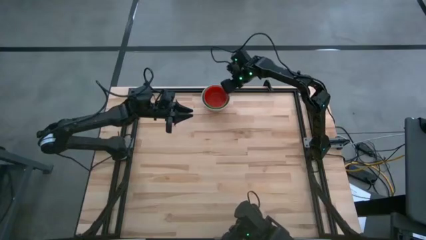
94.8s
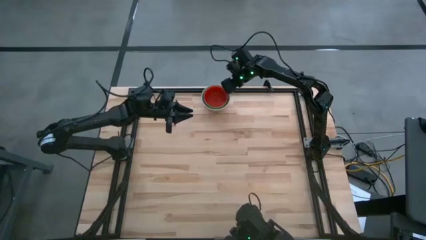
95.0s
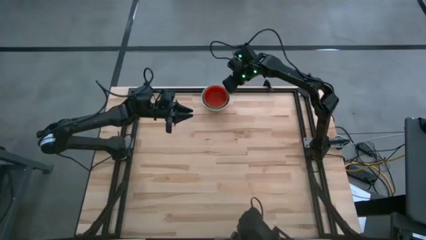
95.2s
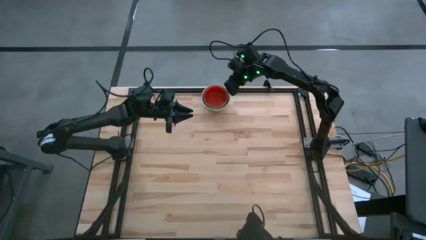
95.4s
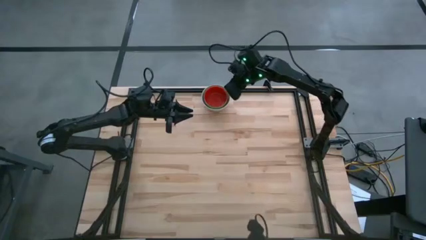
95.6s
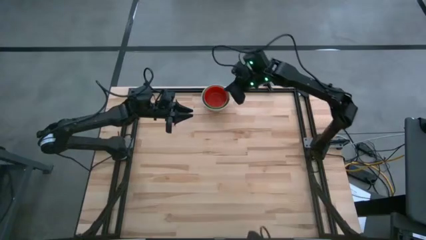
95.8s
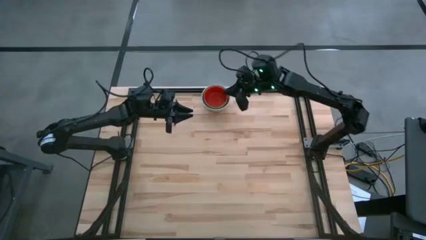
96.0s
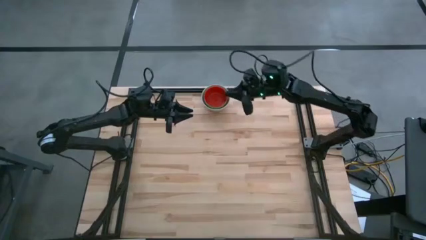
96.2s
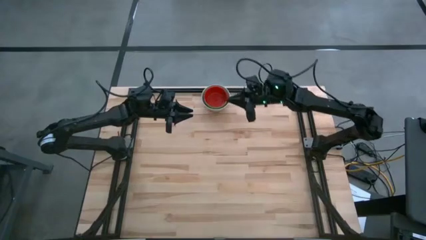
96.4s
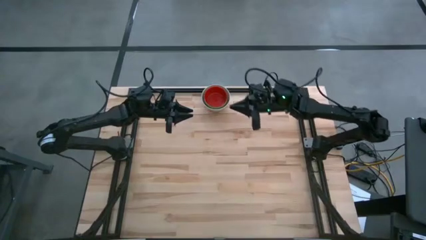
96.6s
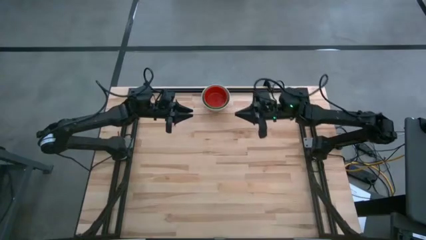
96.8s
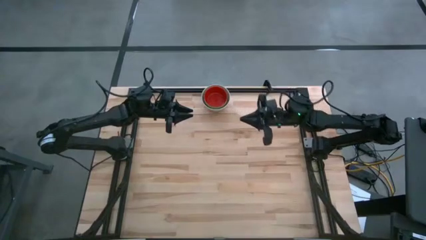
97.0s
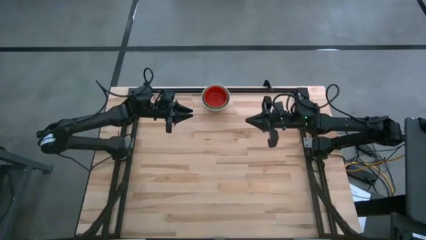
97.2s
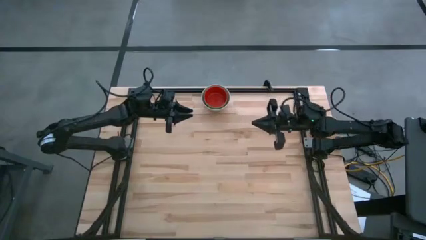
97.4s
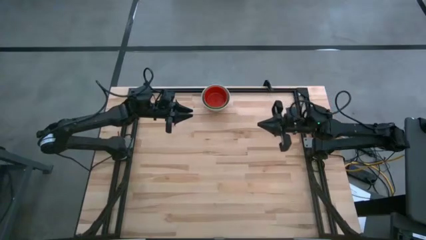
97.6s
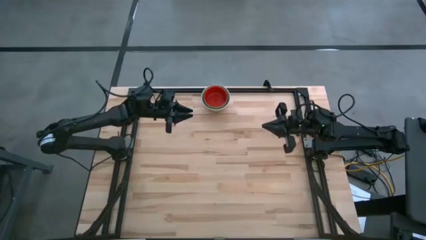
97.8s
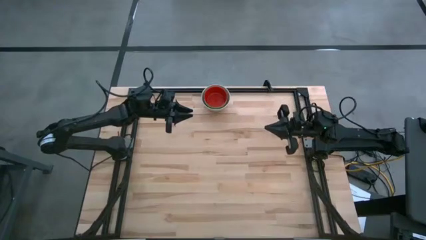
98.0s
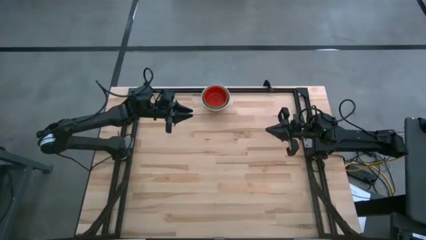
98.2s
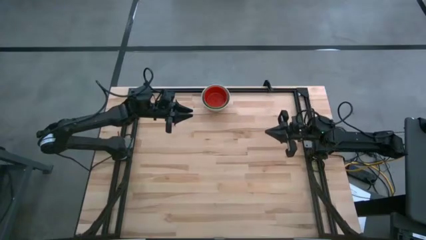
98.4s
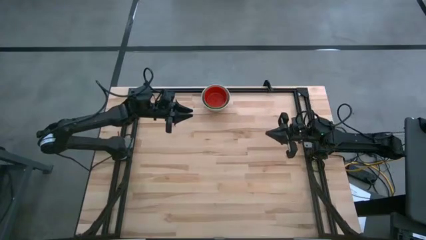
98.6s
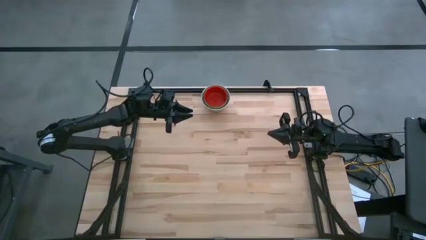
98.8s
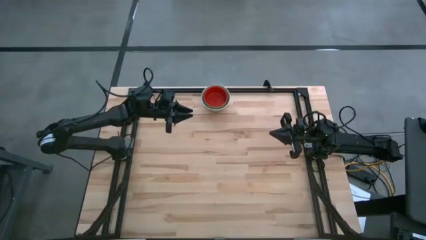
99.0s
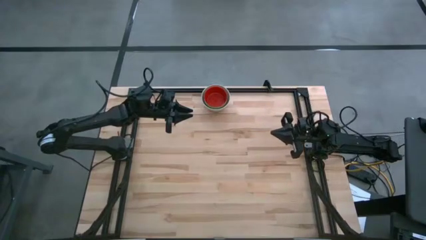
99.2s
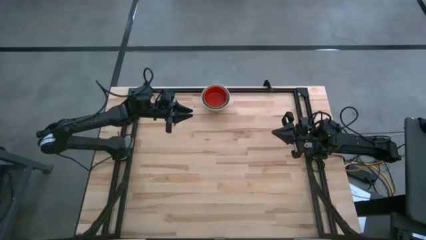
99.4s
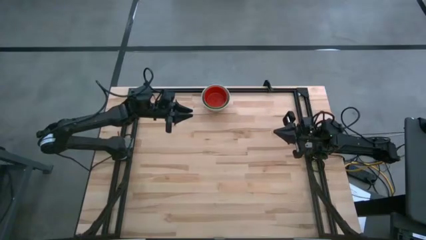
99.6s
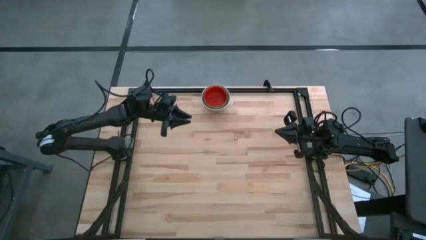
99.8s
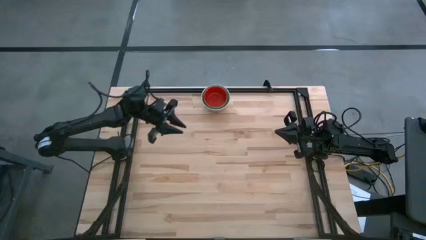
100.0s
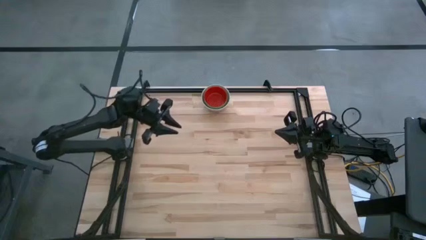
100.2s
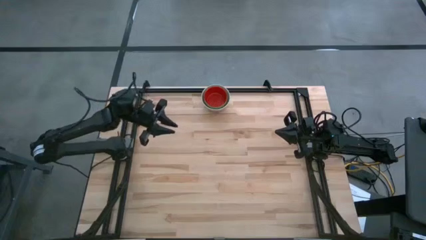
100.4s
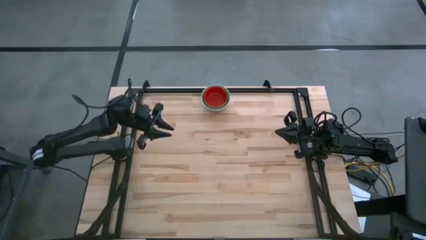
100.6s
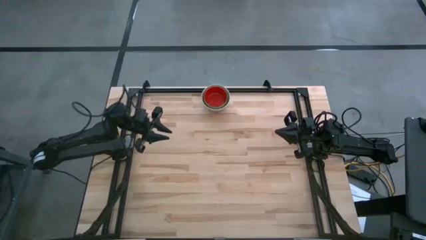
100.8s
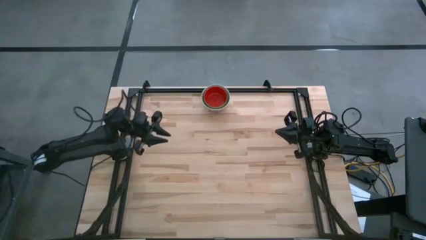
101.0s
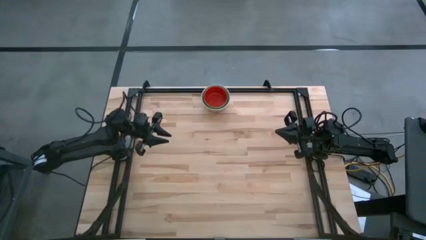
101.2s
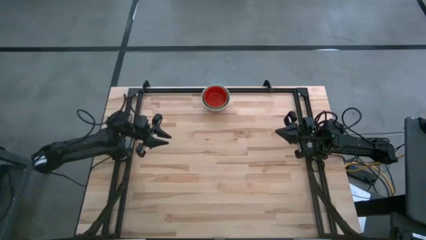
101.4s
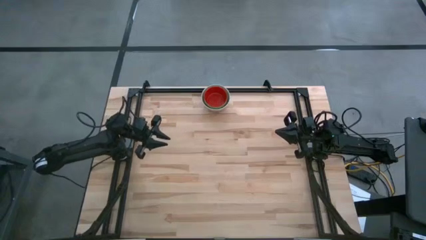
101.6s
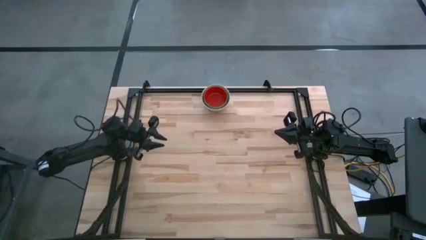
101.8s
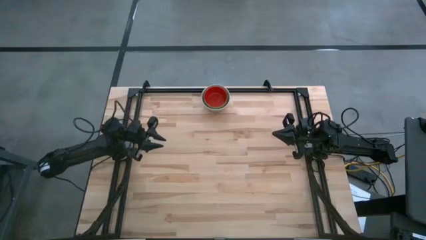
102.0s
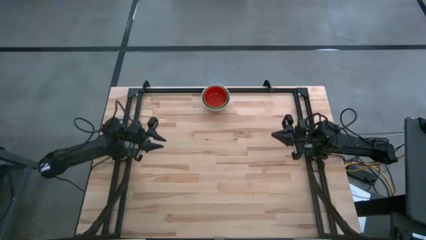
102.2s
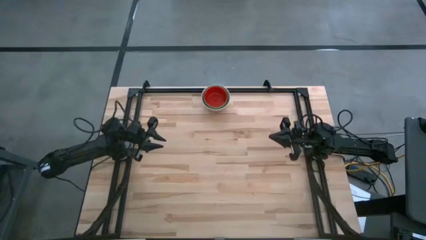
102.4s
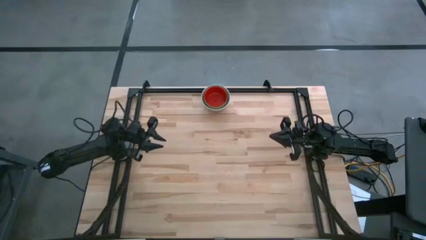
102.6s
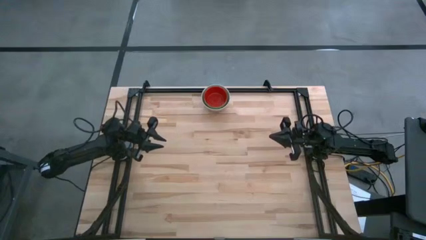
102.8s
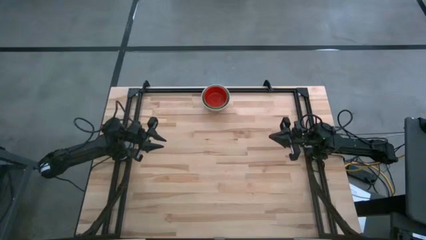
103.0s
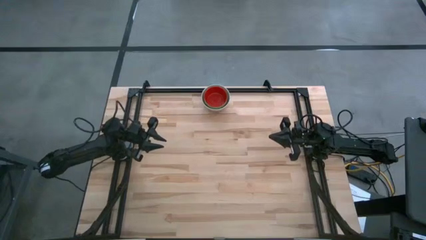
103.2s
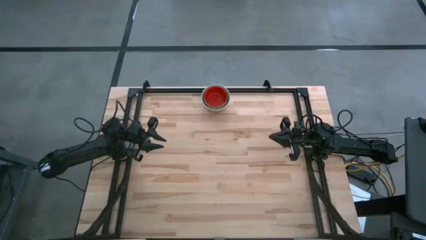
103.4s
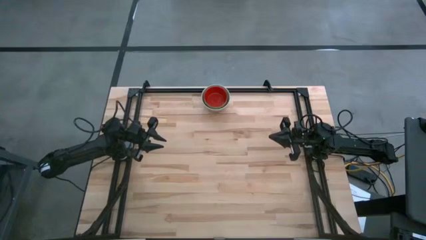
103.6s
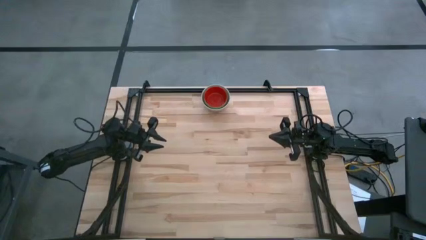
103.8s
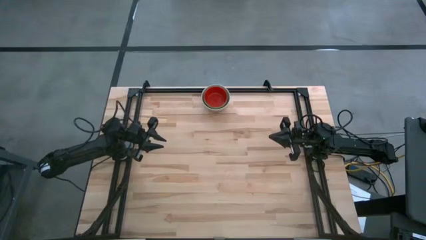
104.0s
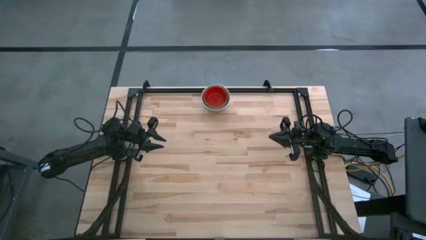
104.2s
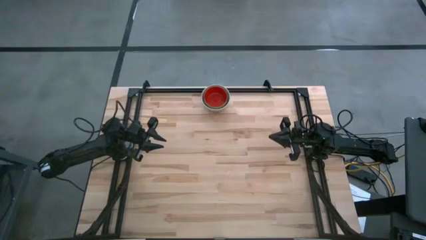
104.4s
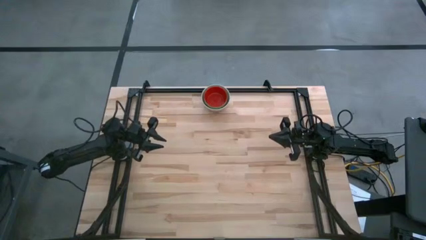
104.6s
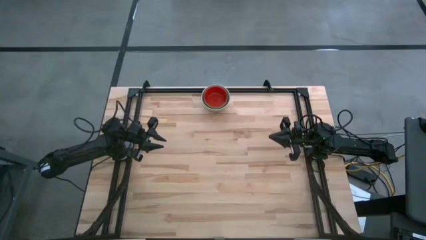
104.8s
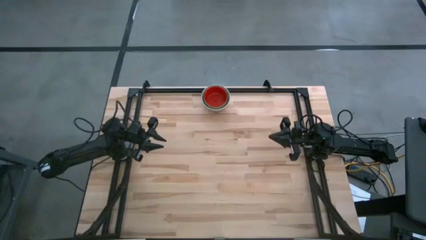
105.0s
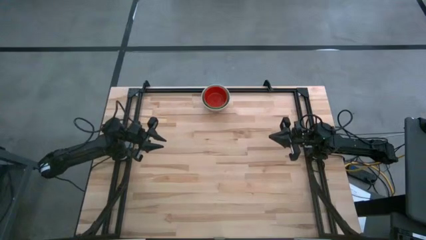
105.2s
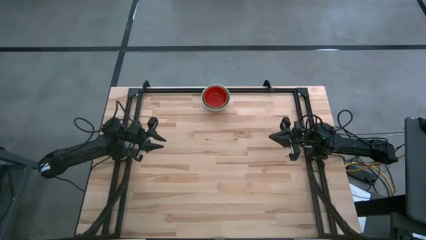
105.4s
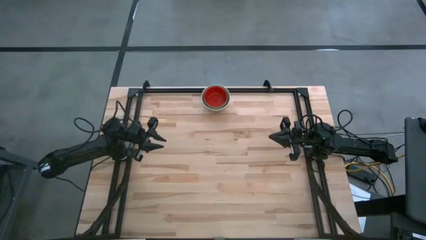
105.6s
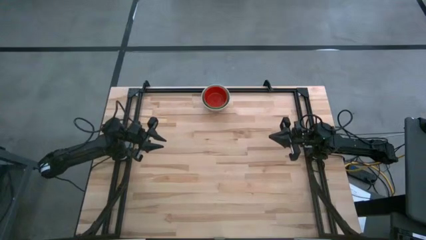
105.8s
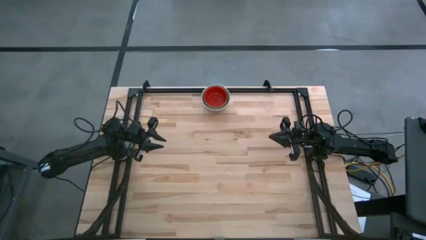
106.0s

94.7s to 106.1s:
Return to Home Position

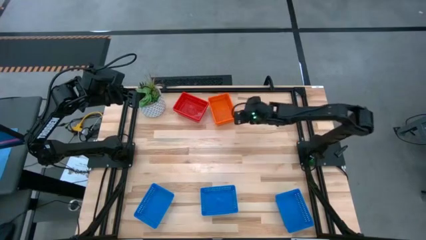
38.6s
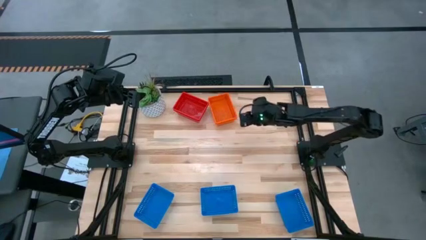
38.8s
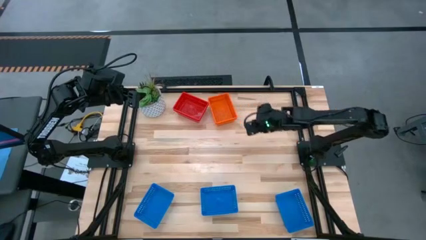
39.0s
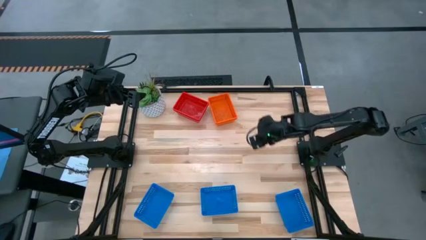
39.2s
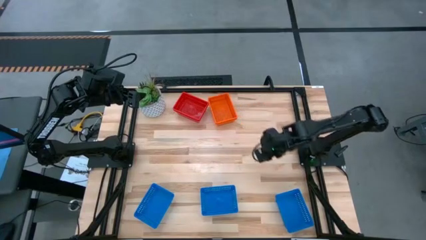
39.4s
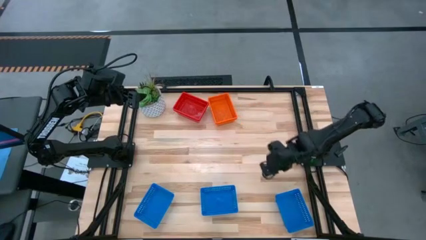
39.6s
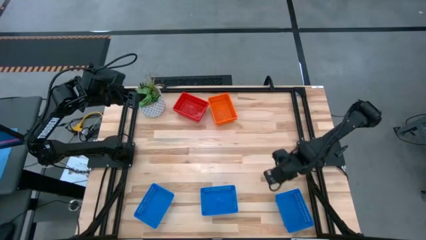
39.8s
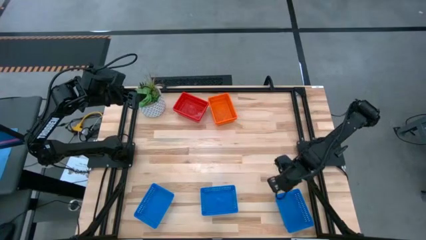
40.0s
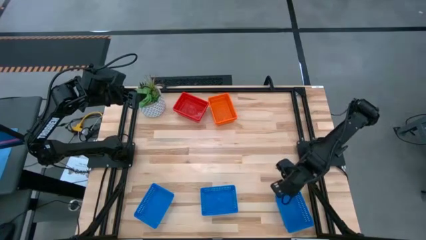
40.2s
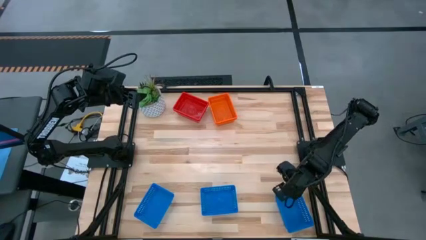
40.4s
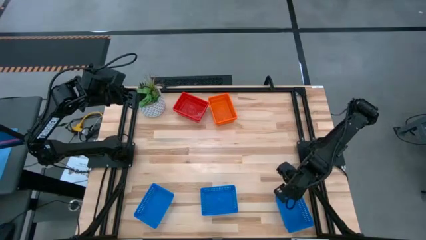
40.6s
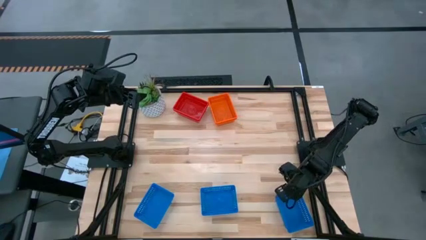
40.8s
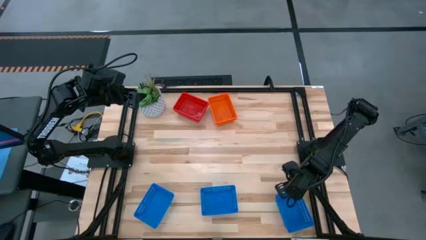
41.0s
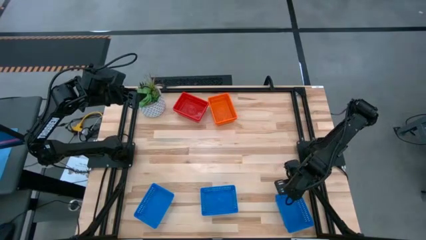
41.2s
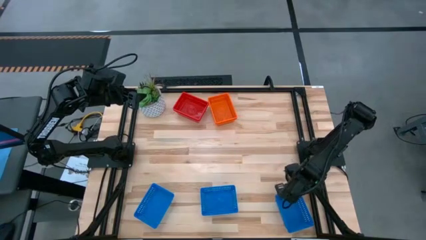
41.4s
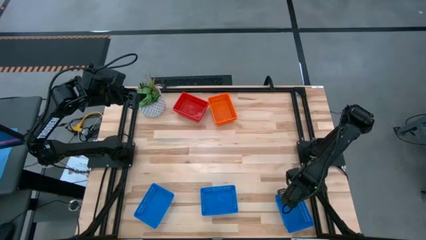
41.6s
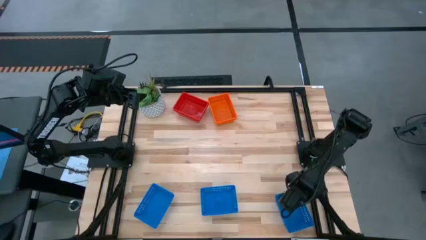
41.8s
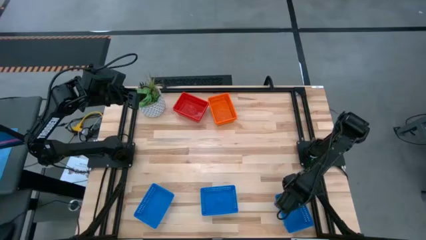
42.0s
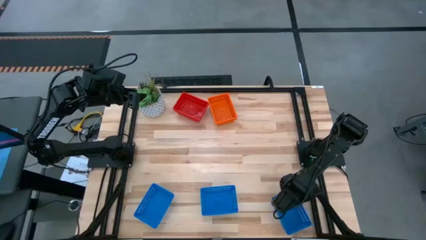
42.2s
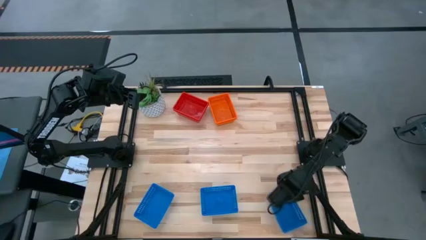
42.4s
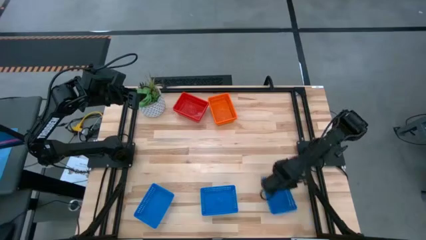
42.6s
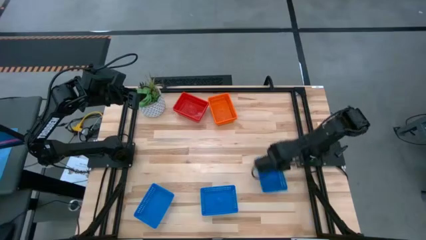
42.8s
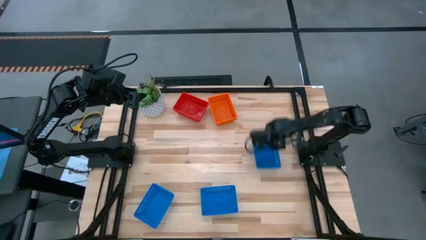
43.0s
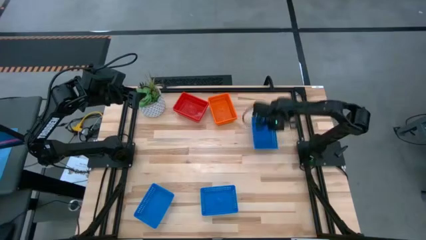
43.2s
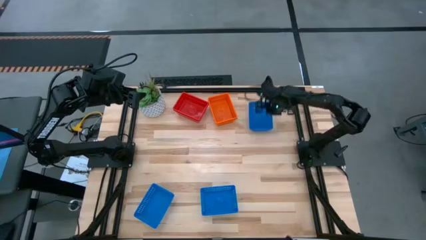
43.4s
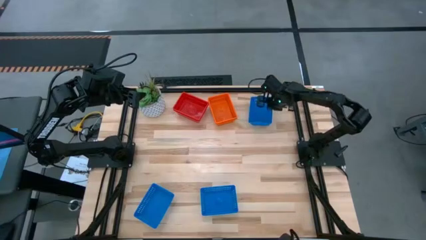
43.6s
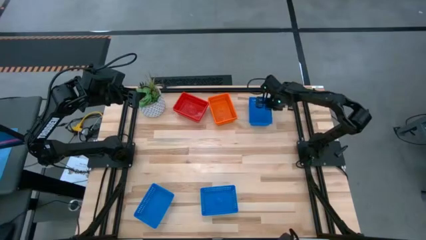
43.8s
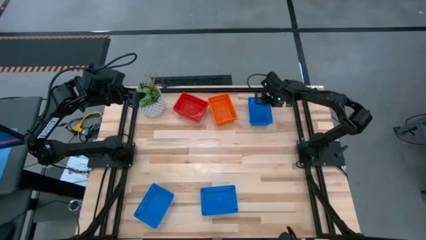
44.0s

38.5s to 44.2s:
Adjust the right blue bin
